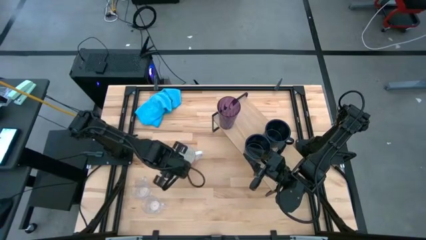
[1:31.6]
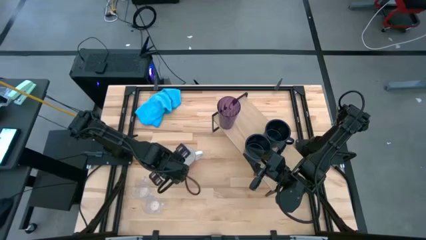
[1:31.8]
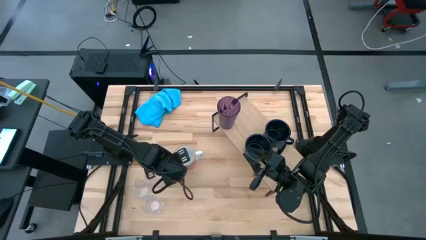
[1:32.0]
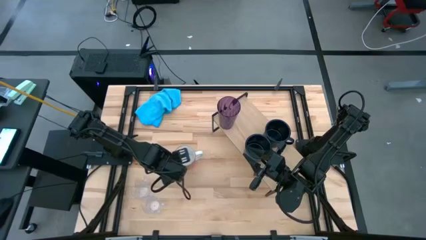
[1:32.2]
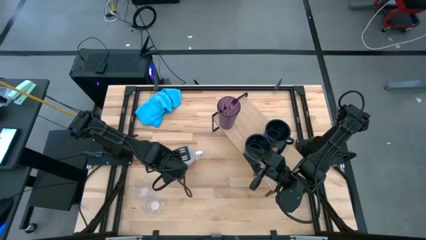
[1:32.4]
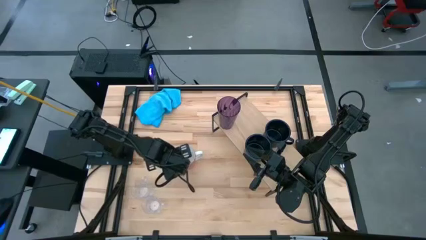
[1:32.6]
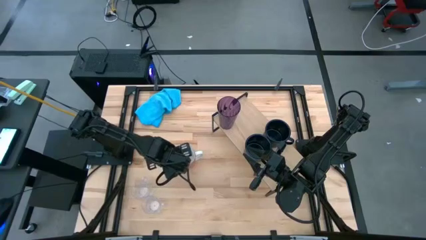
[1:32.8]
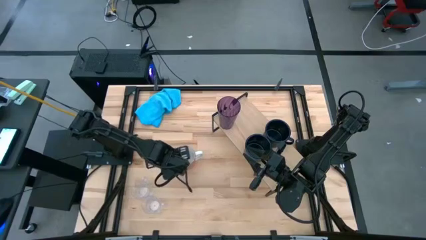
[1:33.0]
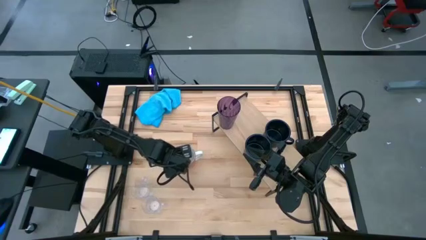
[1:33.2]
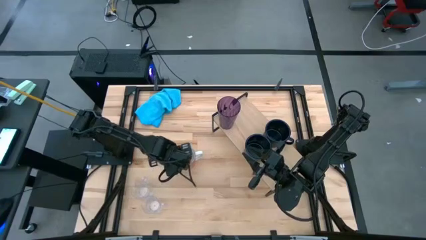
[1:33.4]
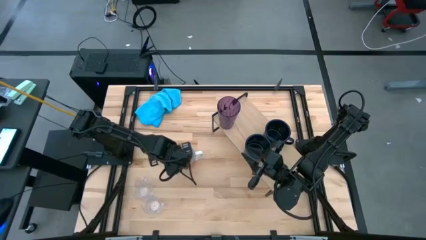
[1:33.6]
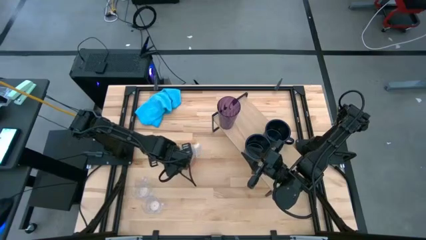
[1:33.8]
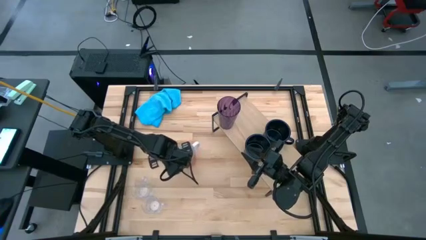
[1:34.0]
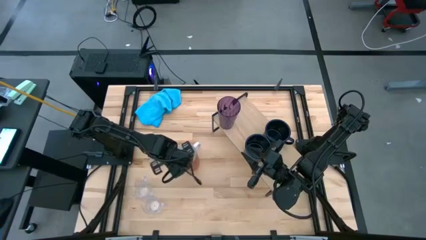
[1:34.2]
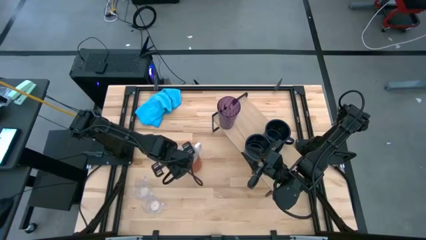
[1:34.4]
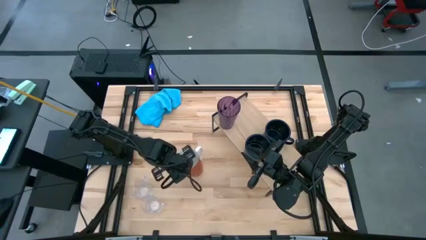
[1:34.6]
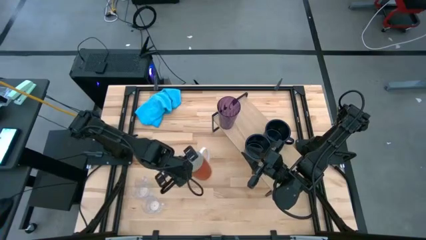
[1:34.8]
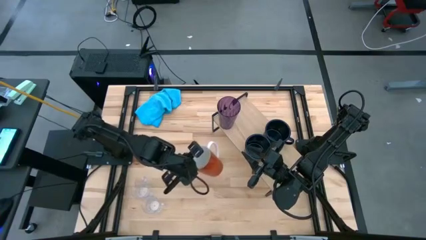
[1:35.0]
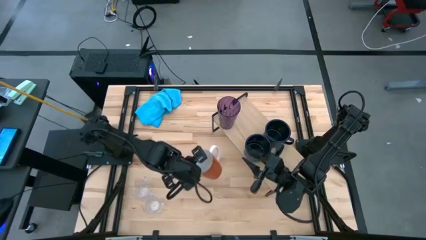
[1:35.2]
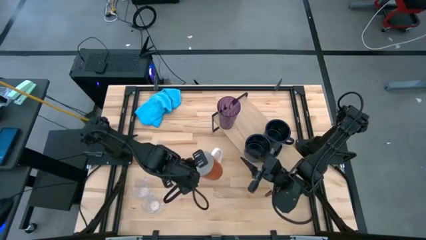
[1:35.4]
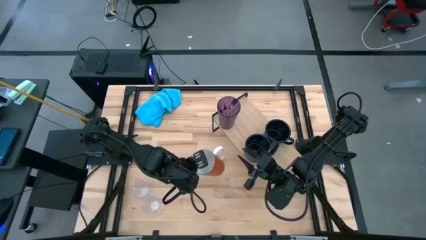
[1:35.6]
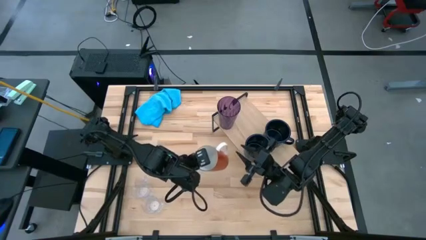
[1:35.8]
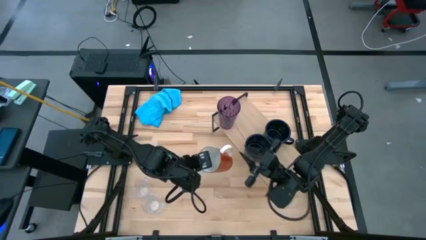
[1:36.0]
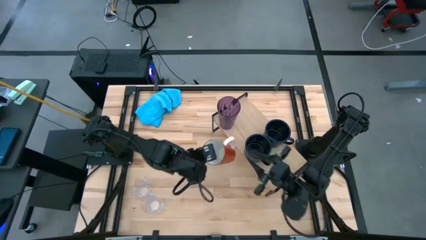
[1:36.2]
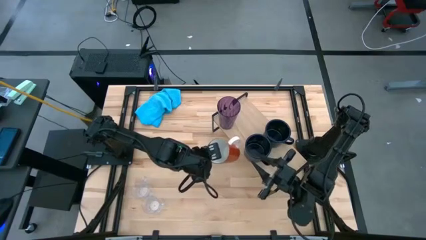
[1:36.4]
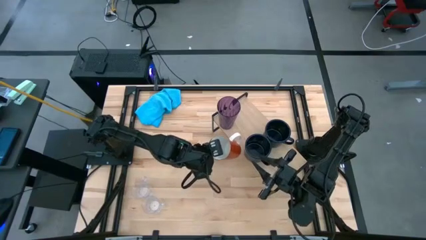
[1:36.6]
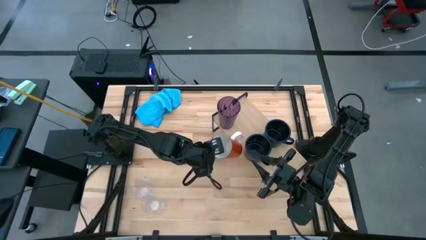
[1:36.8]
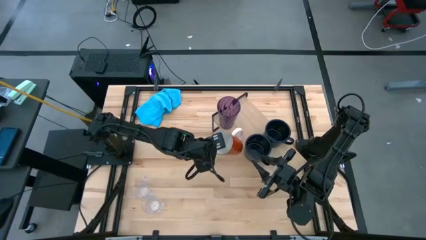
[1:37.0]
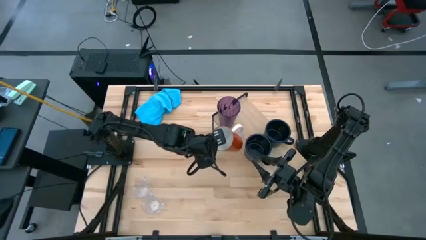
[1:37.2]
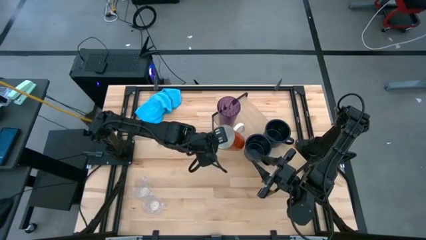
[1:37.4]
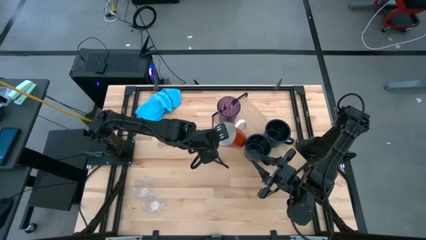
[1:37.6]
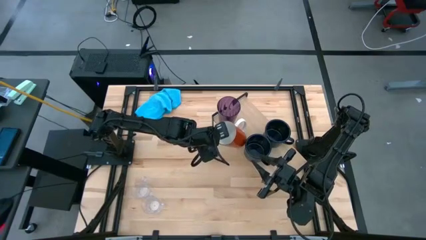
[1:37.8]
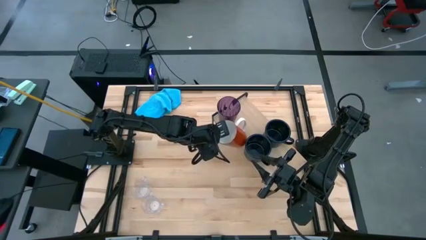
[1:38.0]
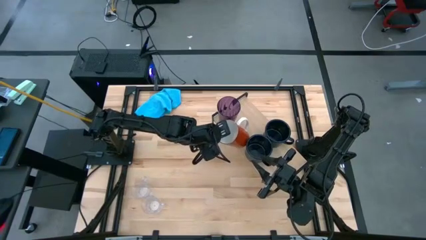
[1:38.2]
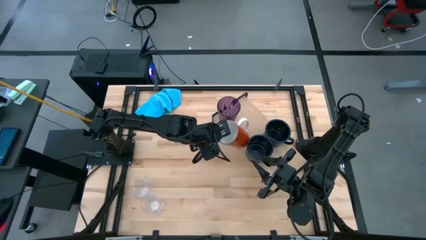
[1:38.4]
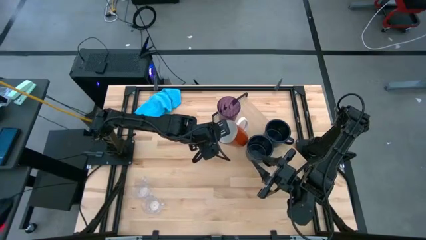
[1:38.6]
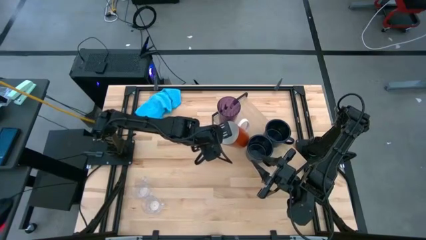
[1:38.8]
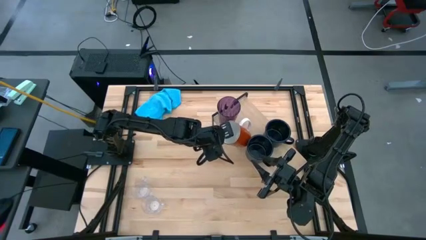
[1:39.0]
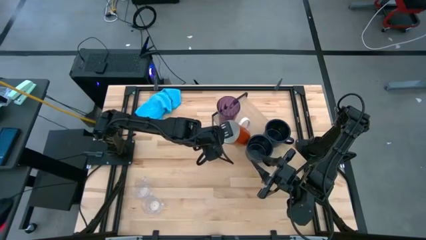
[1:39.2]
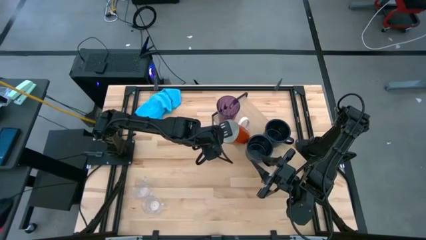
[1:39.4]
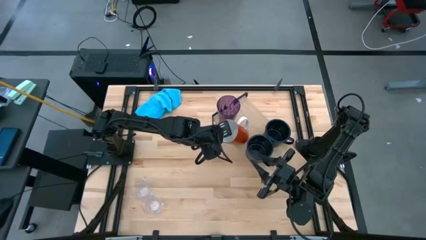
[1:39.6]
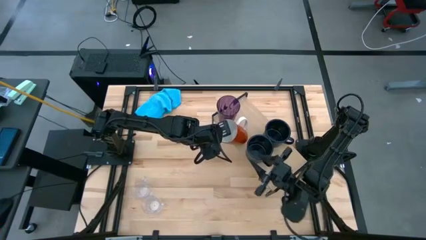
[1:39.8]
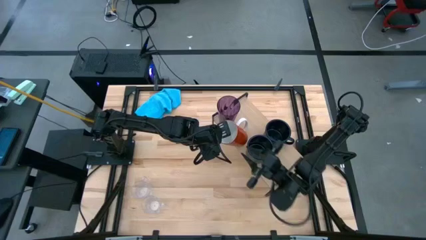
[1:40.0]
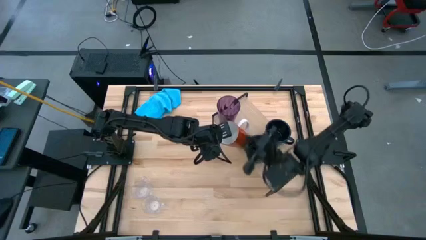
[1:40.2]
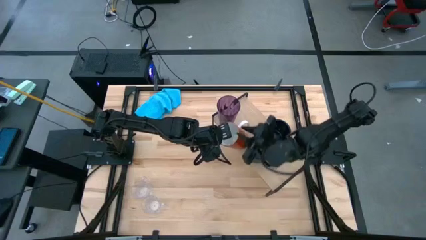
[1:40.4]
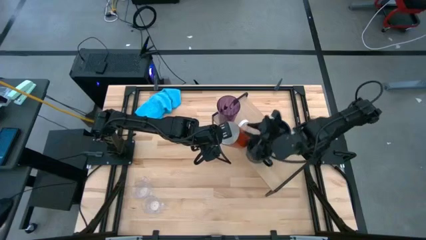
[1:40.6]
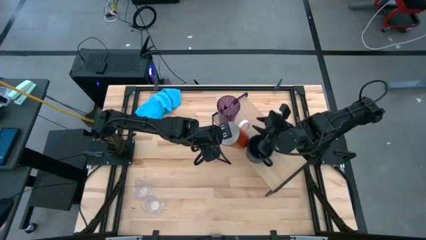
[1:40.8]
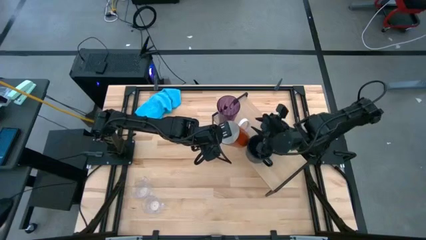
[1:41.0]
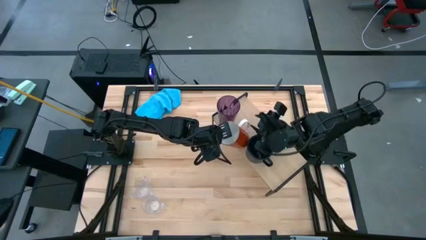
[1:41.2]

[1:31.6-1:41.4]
Task: Stack small to large cups/mugs on shelf
Put the orange mug on the shelf

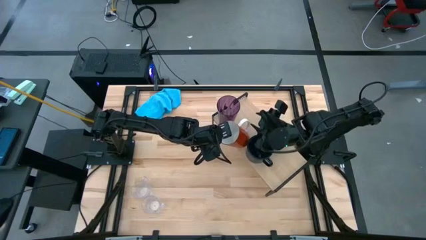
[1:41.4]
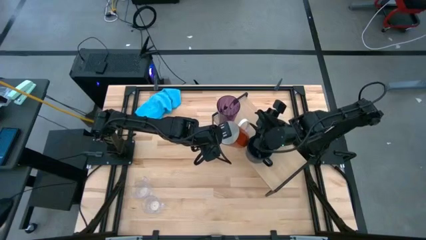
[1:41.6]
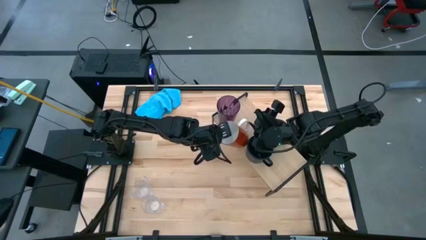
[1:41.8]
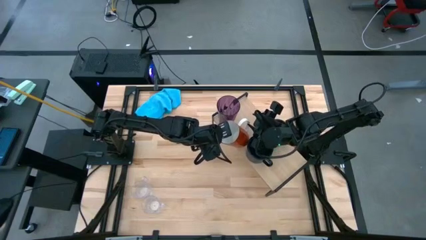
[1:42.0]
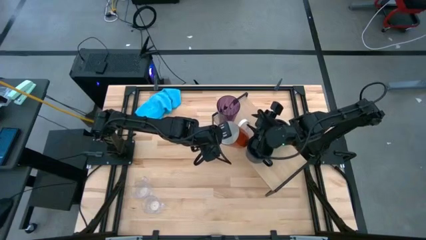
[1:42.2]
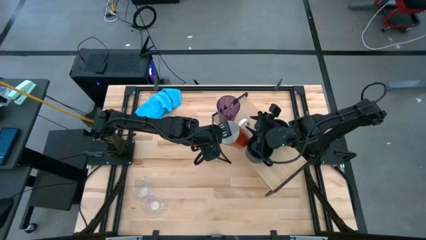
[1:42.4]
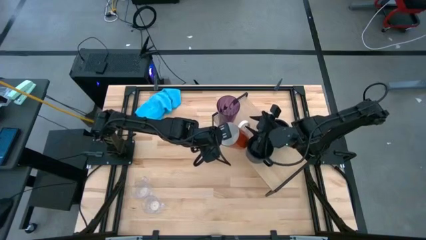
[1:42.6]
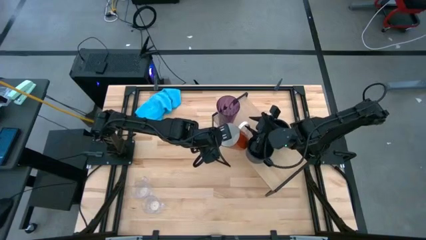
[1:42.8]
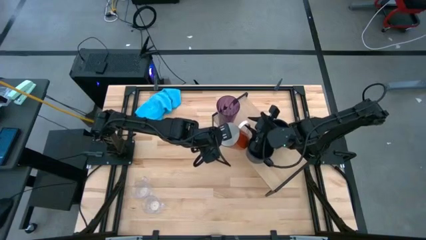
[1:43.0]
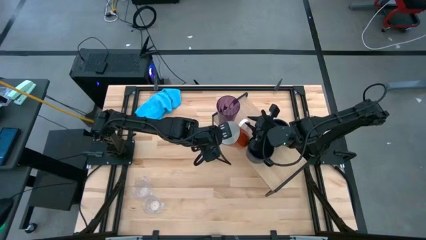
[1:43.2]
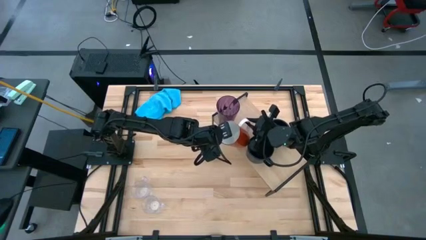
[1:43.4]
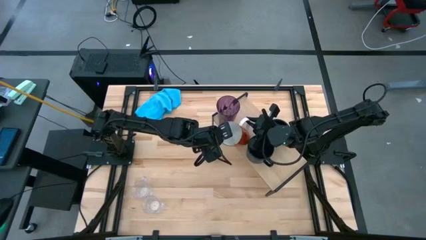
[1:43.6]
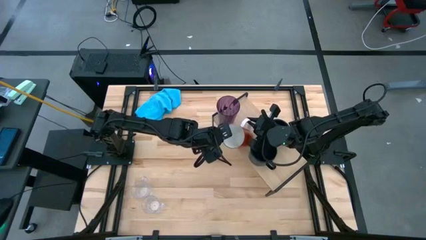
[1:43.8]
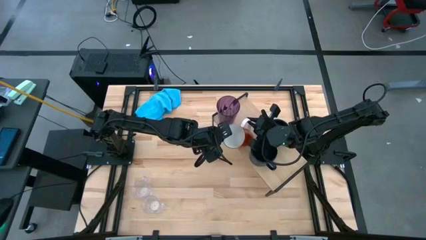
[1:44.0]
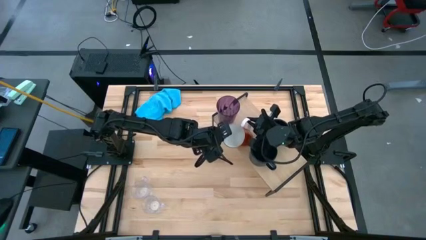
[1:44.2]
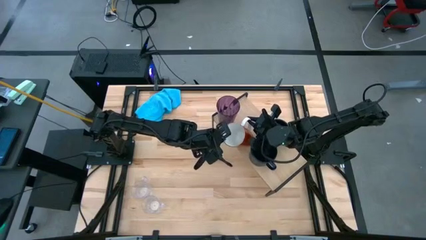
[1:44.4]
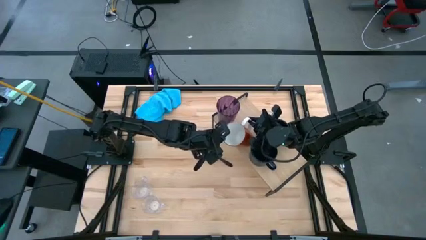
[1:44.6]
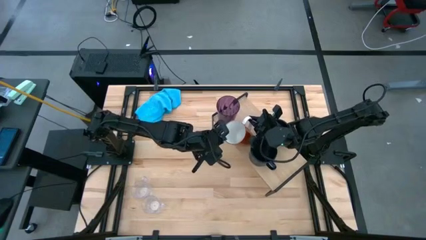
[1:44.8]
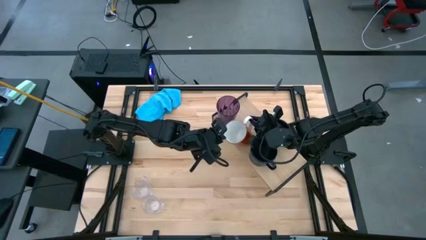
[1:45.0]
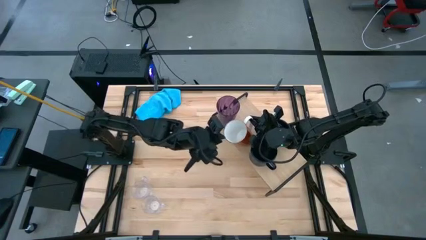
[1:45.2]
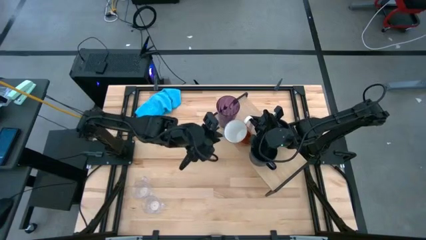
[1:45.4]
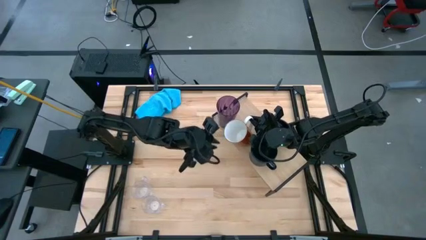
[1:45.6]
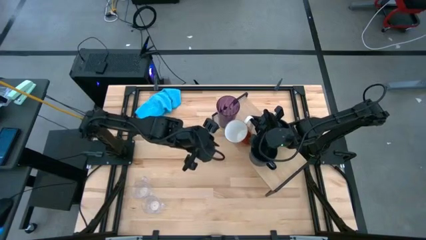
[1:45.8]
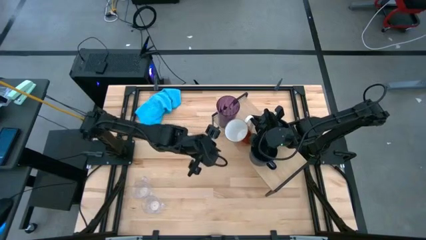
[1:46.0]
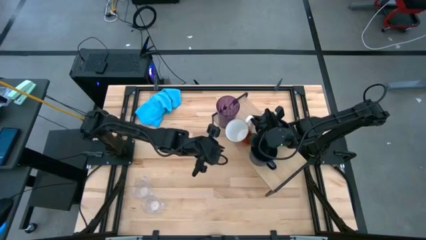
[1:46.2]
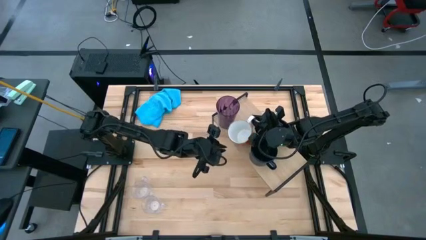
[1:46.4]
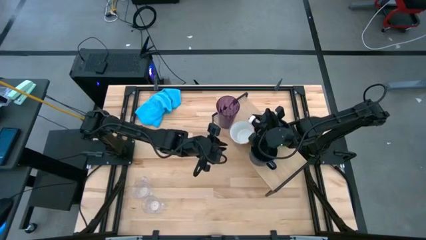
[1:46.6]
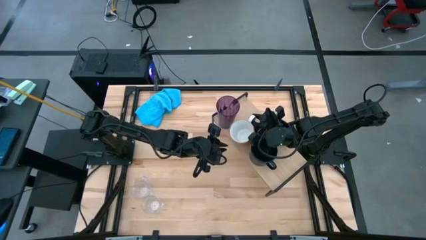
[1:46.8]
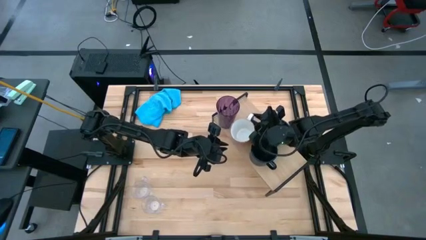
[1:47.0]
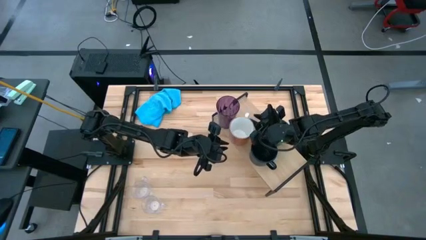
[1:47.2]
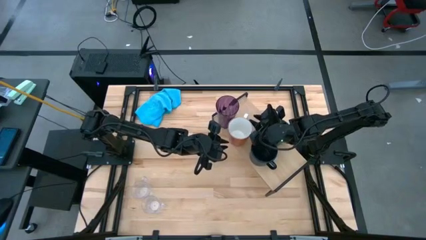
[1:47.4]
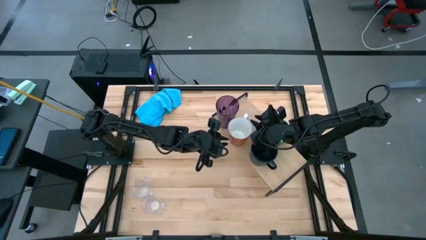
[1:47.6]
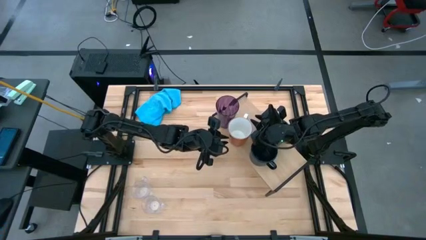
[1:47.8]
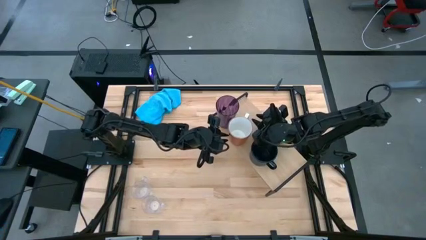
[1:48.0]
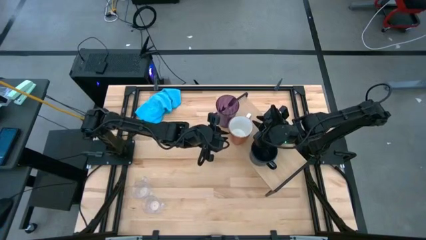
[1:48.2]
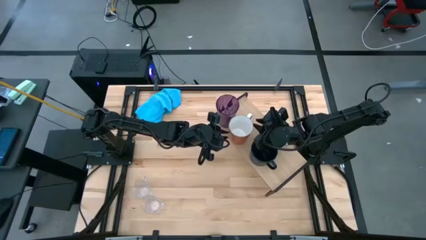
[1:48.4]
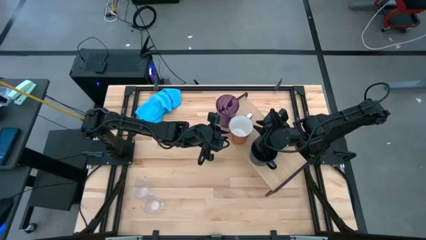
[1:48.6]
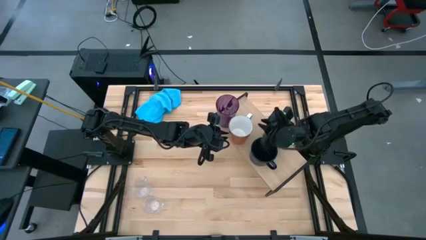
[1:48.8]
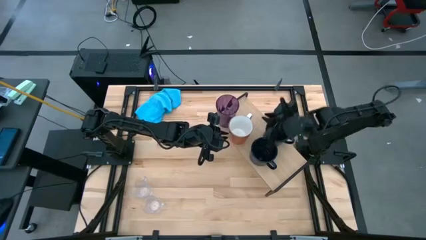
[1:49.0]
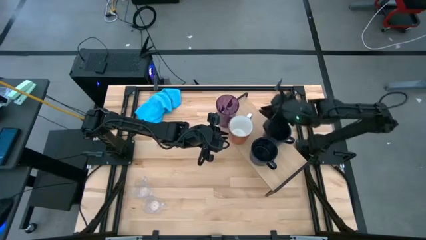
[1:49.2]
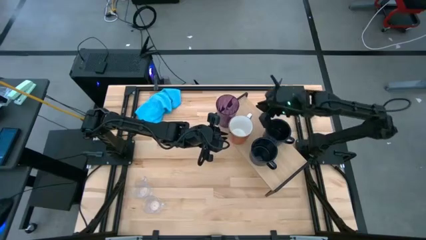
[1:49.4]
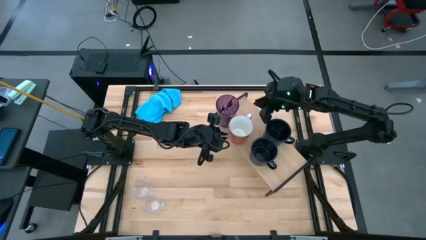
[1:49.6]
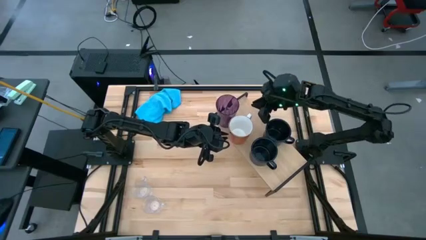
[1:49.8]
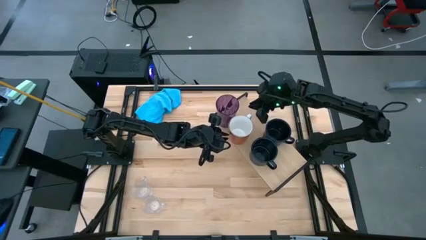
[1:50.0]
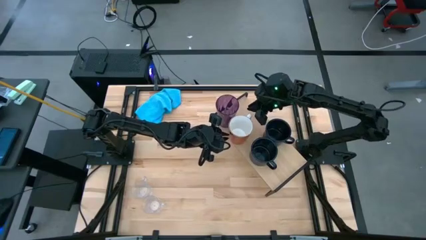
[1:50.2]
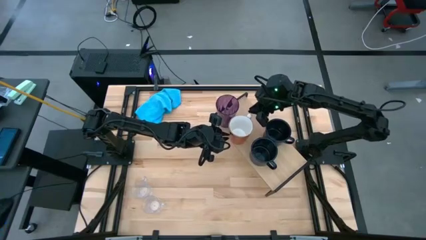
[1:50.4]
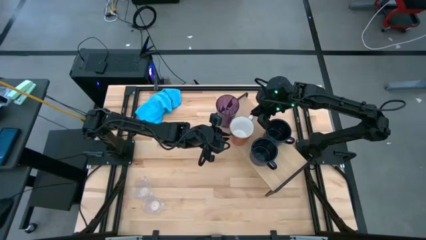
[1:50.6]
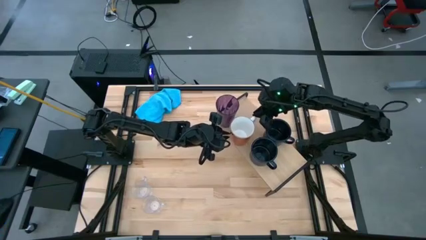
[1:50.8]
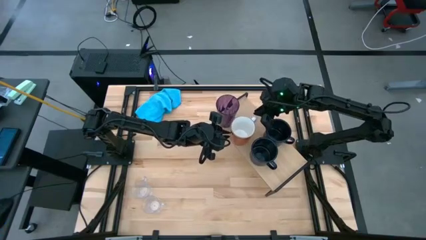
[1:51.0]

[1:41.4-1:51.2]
Put the orange mug on the shelf
